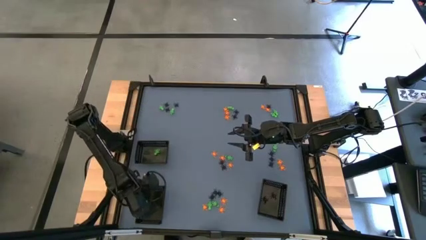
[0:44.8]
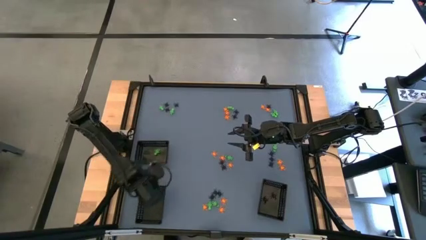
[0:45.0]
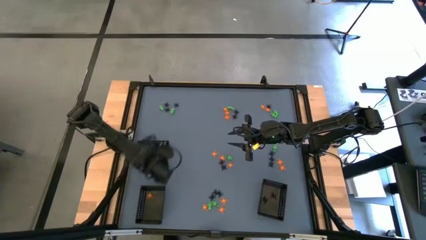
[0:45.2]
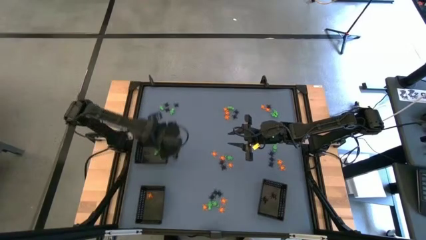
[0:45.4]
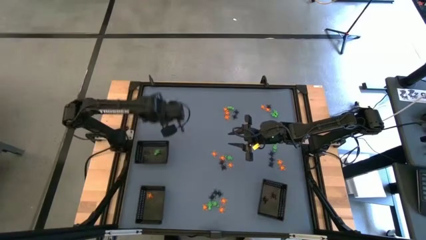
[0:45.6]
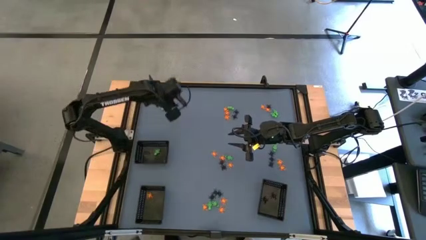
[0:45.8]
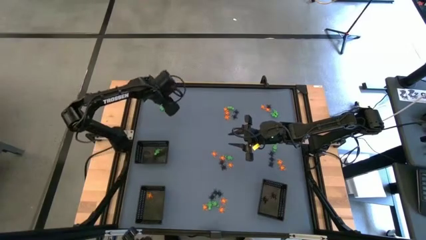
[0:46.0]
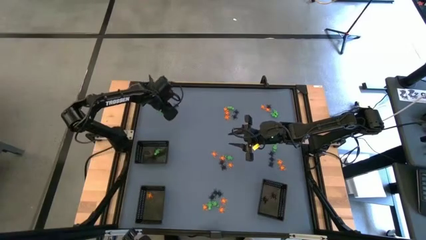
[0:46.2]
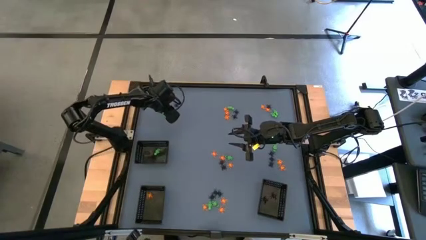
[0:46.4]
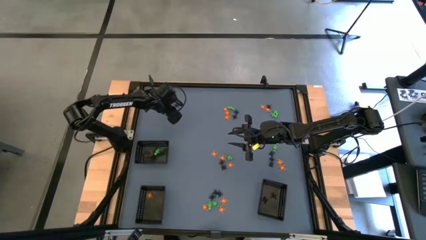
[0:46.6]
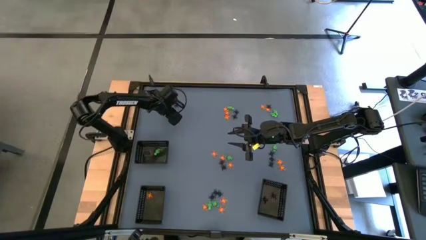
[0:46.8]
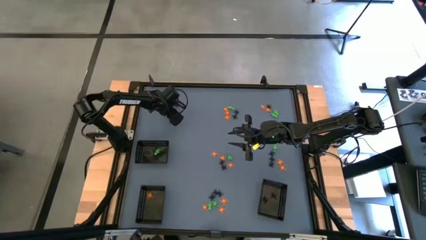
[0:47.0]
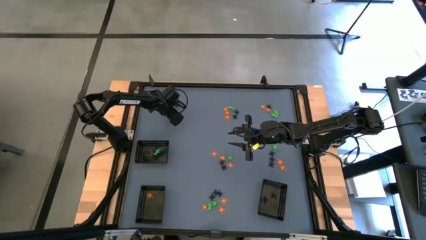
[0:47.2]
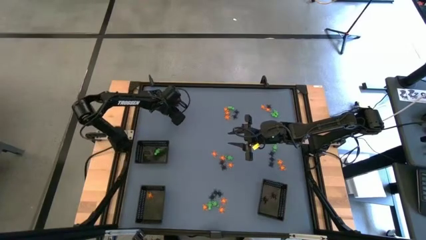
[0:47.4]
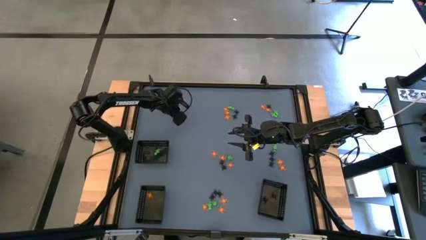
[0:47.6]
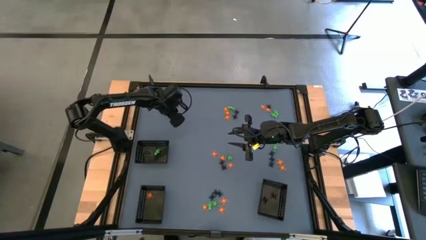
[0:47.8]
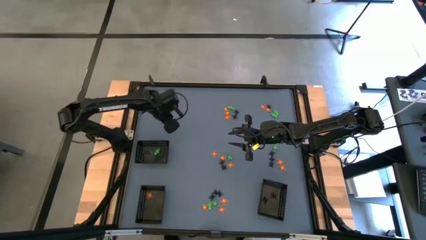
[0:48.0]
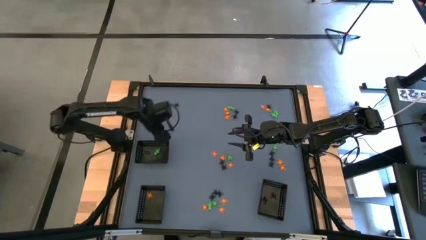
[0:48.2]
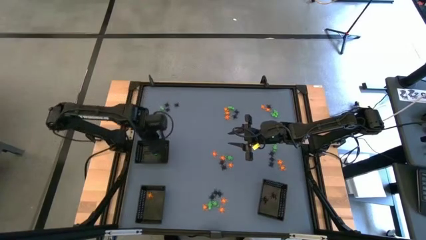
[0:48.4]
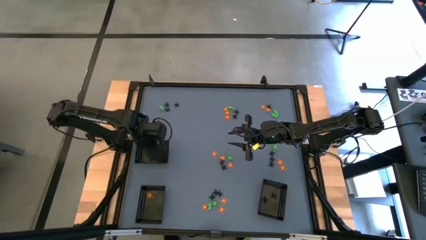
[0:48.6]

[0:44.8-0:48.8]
Task: Sort Halloween decoration
Put the green skeleton toy into the top black bin

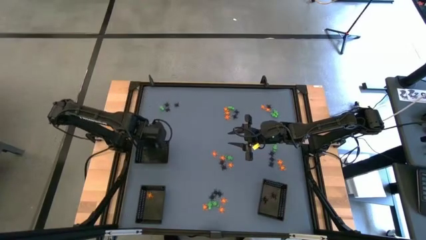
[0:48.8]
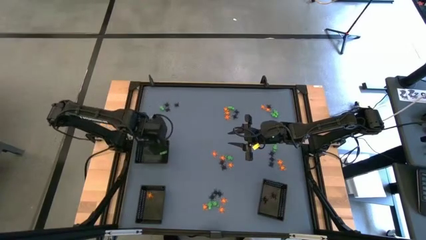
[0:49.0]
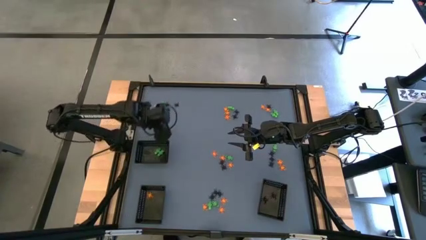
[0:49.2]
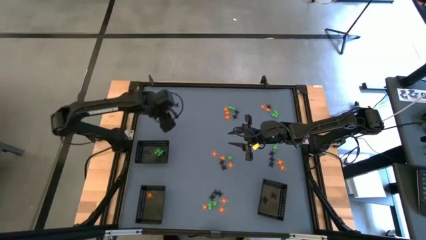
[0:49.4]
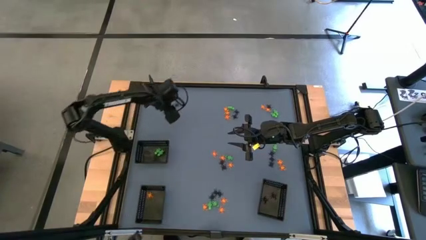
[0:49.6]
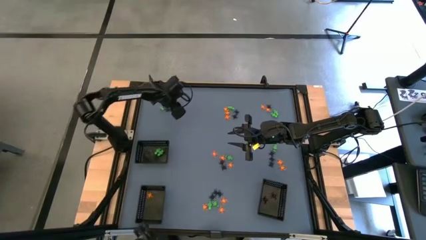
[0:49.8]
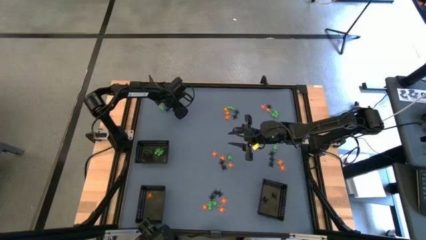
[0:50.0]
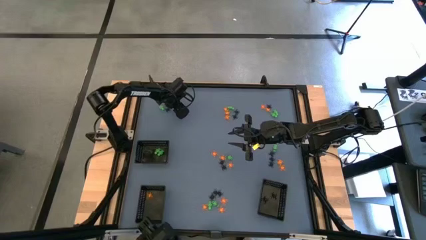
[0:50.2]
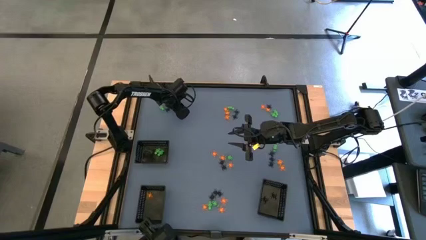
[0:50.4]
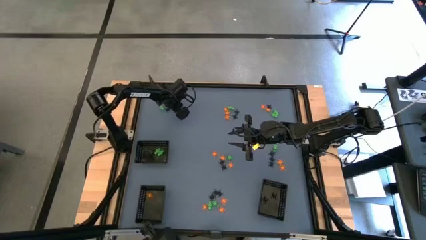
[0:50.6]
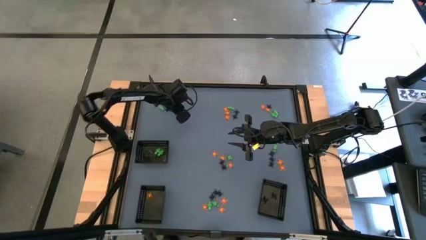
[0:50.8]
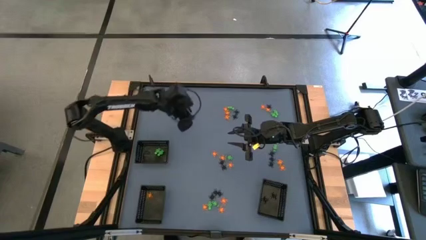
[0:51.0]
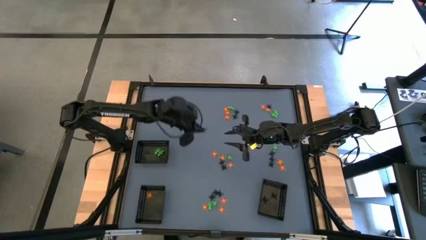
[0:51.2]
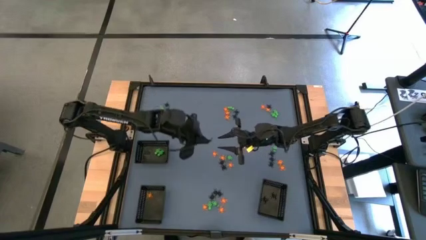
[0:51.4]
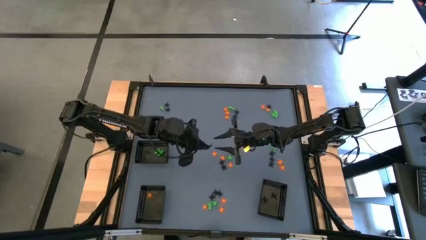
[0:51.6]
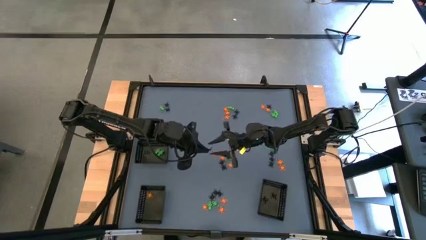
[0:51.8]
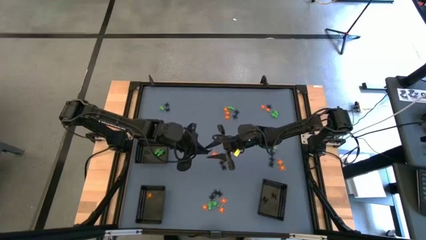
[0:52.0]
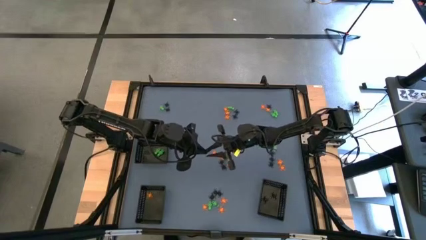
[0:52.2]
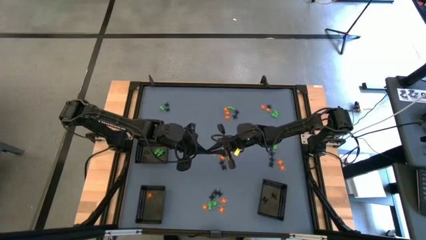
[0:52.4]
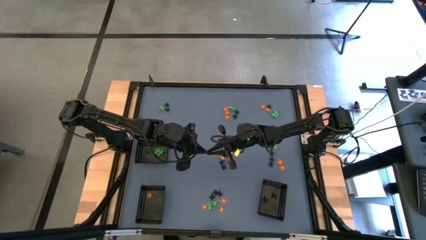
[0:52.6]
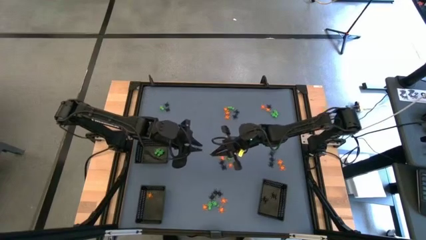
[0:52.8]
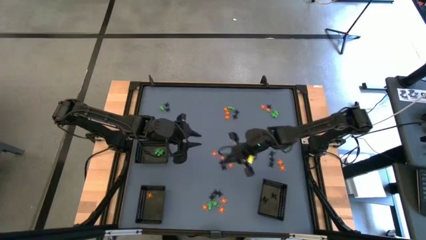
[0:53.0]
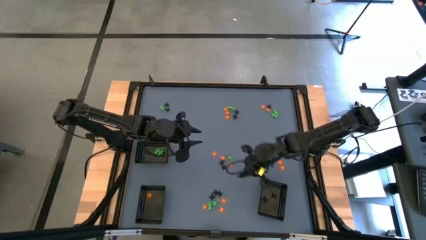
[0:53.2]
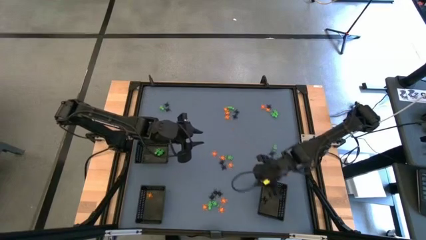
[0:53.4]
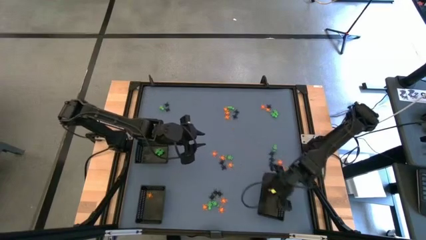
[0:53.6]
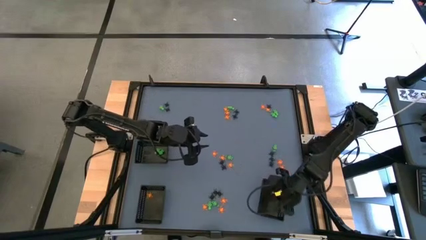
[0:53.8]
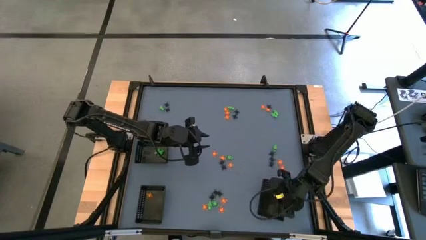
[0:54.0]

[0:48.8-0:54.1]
Put the black spider toy into the bottom right black bin

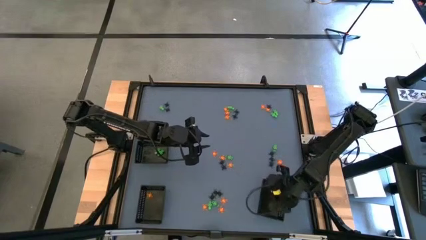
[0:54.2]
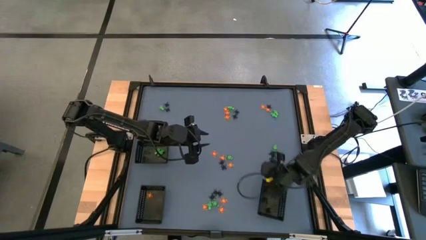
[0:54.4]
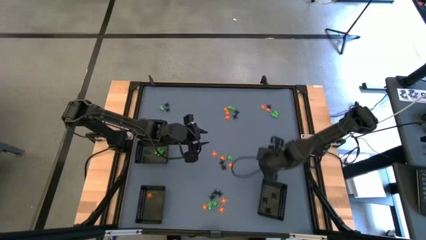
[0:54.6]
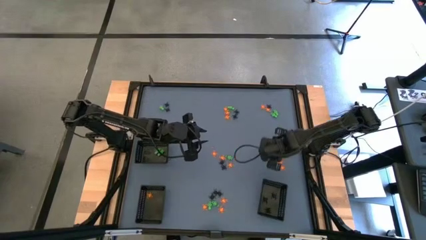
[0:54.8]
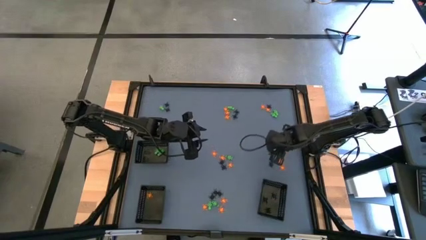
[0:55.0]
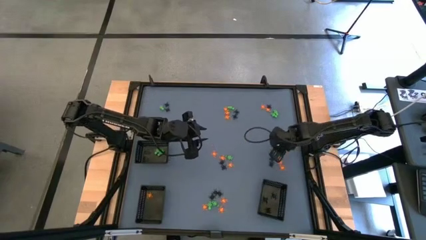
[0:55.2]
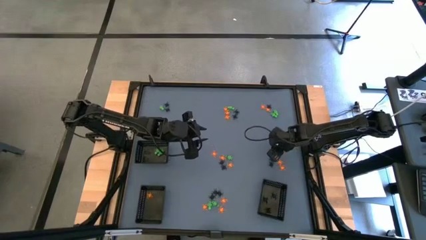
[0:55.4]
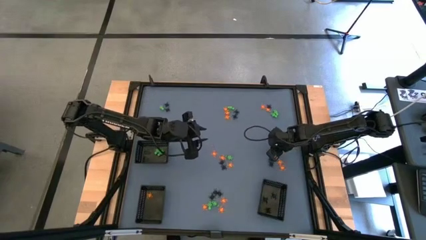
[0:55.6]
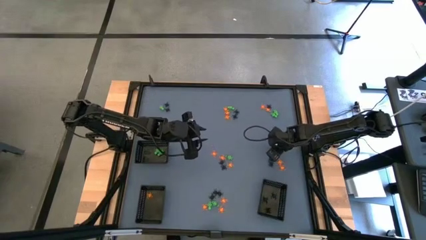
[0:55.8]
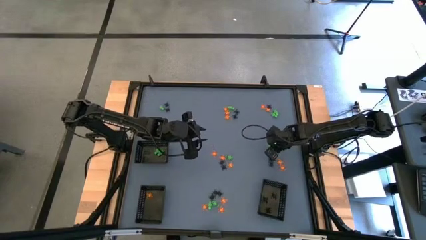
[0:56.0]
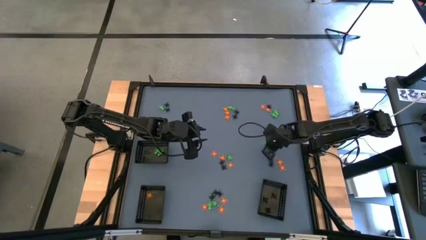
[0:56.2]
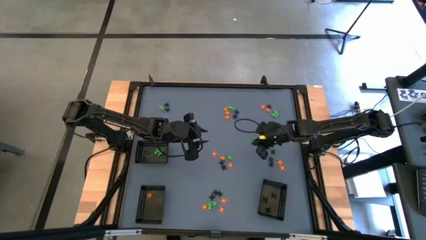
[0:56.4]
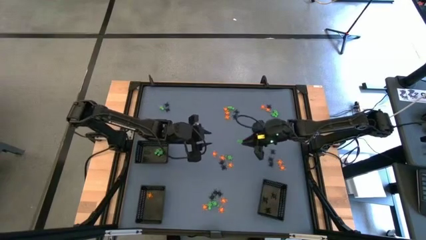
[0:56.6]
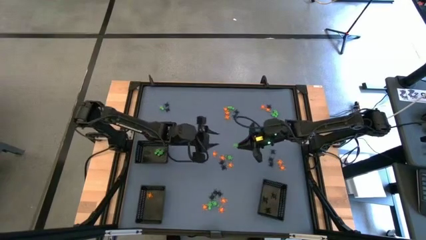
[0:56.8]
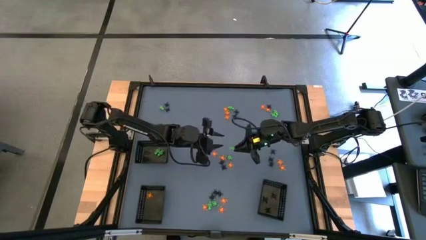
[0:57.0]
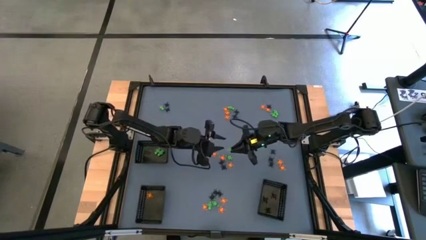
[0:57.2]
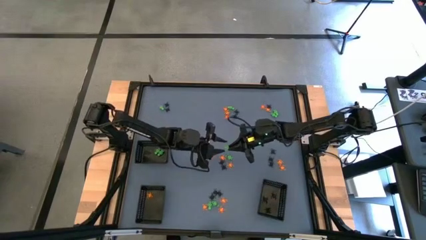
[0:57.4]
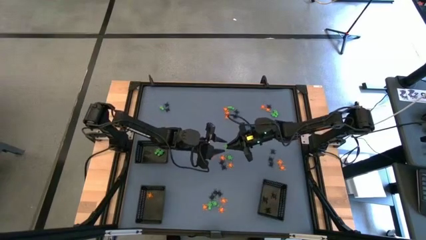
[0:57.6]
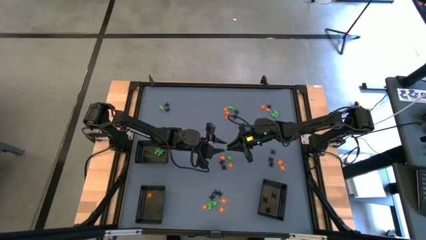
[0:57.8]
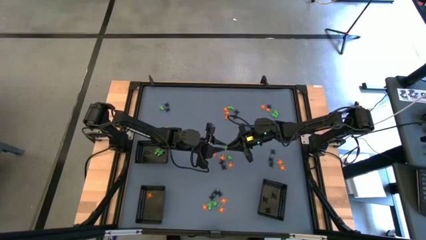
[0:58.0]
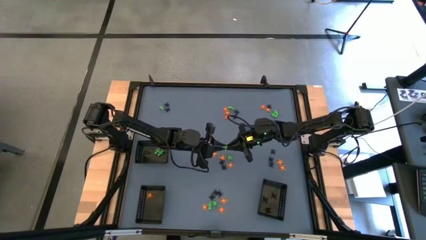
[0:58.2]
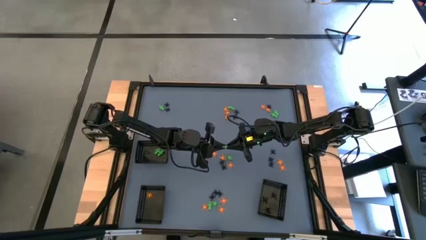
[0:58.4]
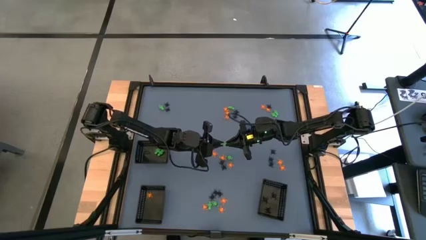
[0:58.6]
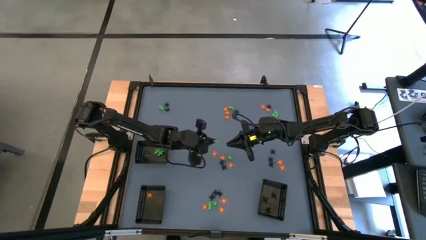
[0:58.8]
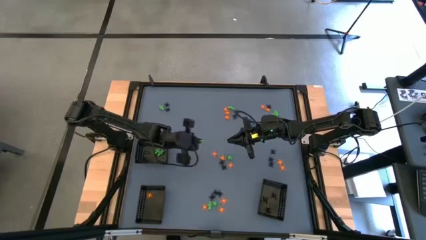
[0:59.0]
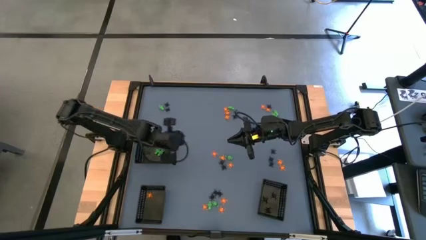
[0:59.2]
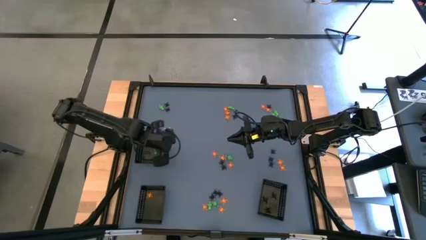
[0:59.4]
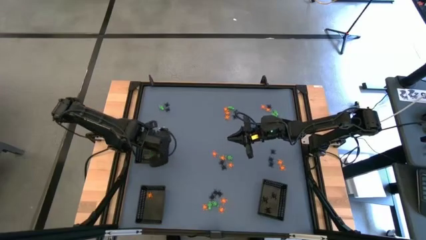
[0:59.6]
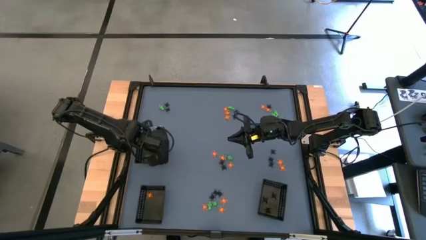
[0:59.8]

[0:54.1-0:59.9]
Put the green skeleton toy into the top black bin

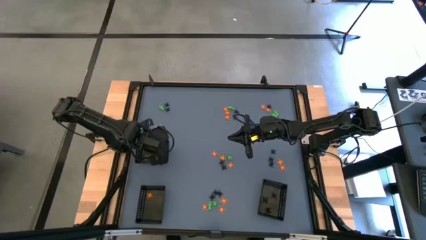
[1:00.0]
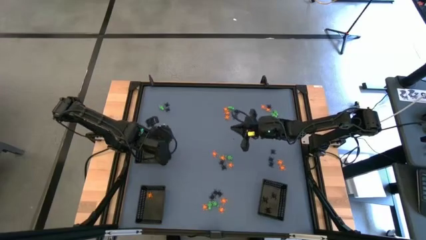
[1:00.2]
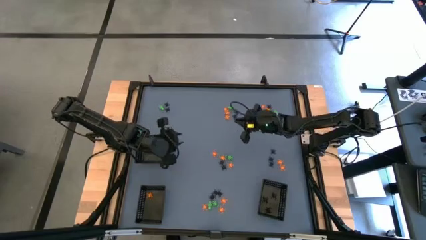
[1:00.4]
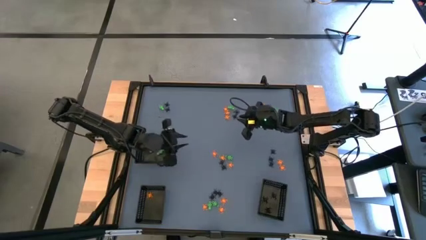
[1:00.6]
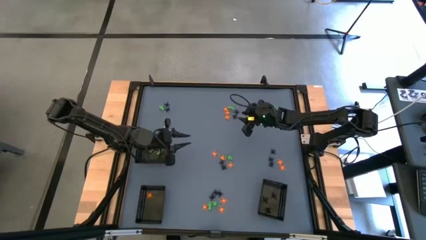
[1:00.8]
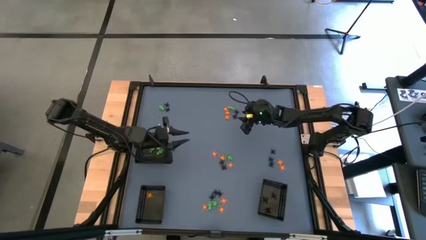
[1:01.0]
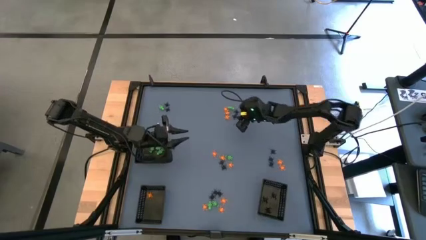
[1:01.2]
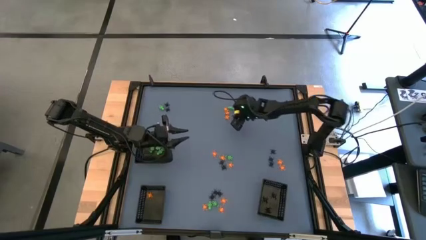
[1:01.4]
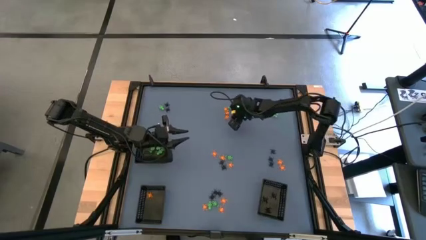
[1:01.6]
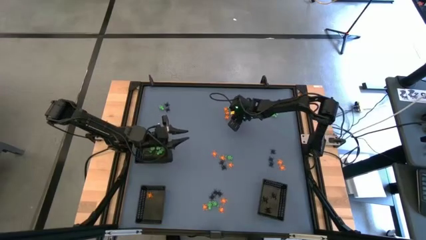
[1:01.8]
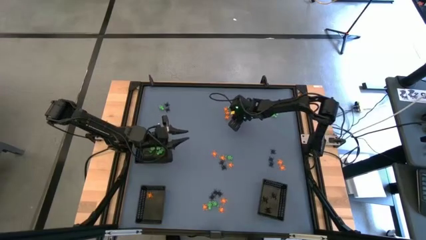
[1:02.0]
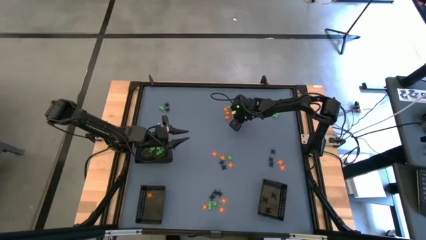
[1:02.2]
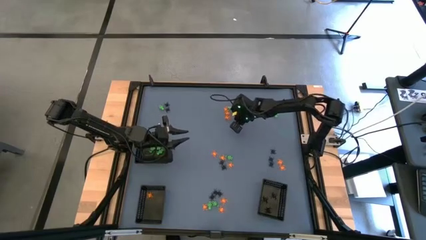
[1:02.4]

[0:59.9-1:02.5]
Put the black spider toy into the bottom right black bin
